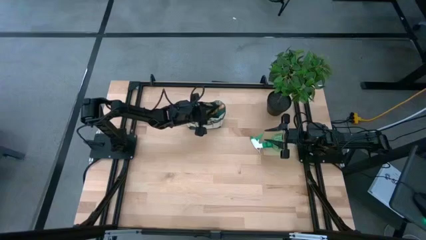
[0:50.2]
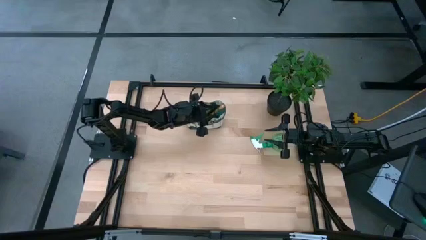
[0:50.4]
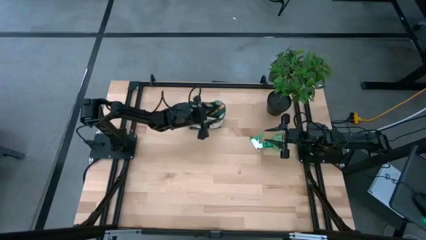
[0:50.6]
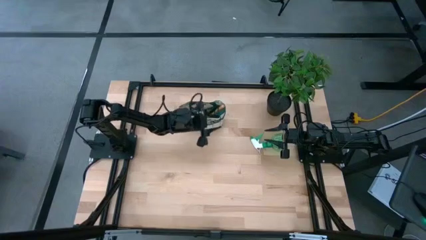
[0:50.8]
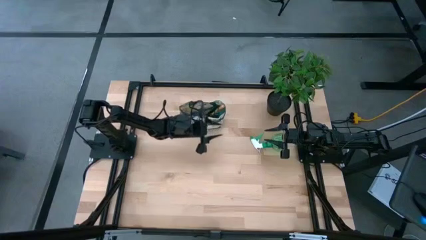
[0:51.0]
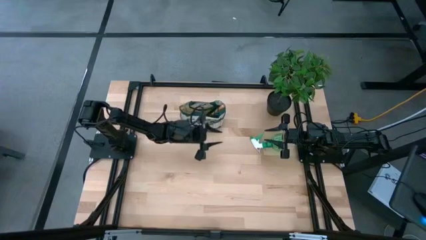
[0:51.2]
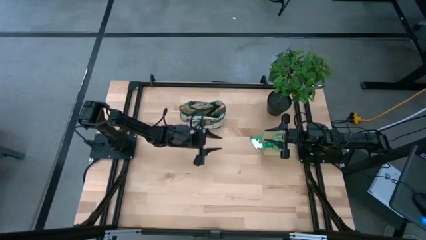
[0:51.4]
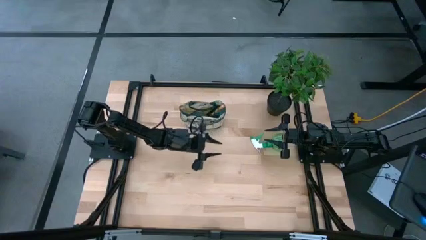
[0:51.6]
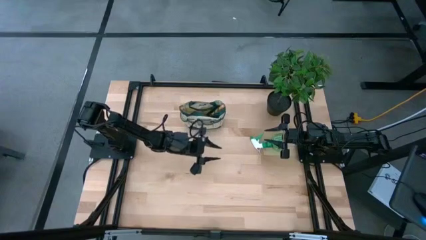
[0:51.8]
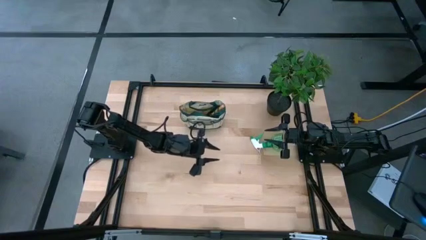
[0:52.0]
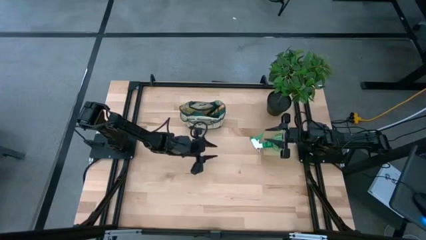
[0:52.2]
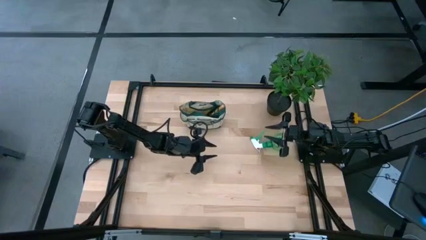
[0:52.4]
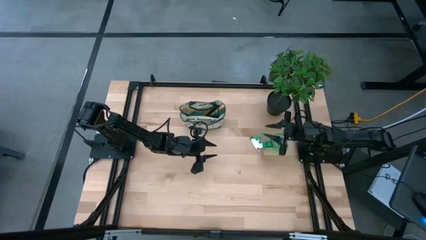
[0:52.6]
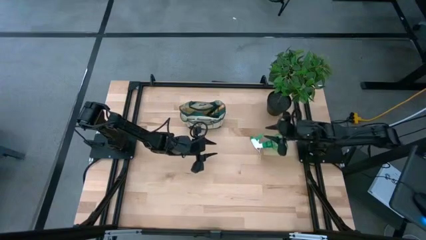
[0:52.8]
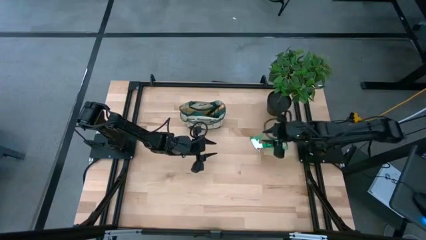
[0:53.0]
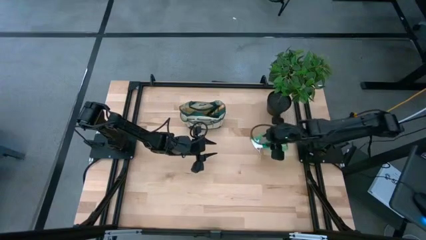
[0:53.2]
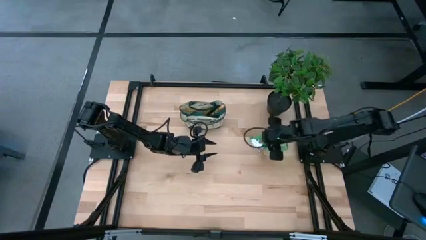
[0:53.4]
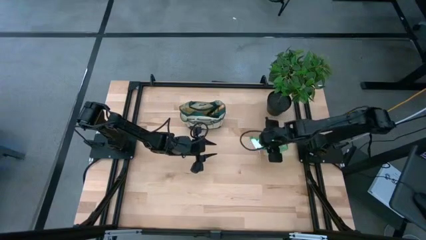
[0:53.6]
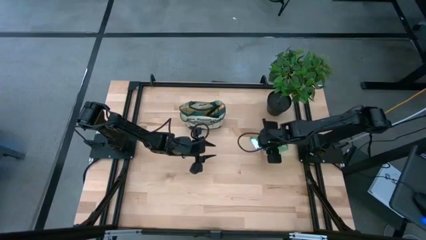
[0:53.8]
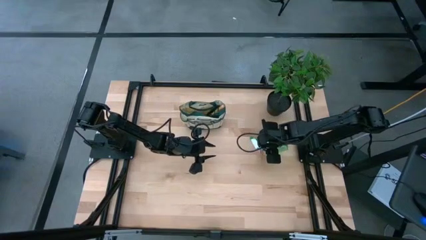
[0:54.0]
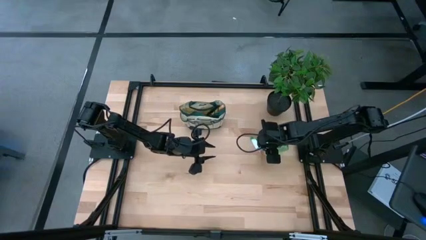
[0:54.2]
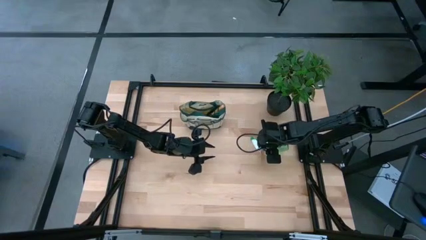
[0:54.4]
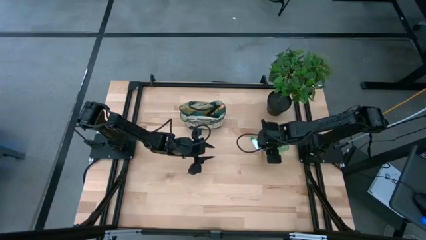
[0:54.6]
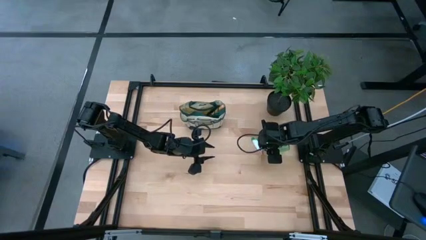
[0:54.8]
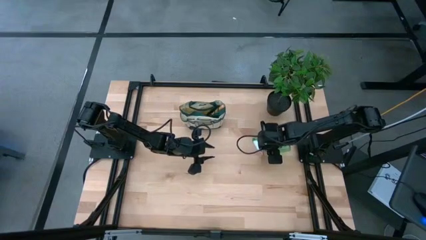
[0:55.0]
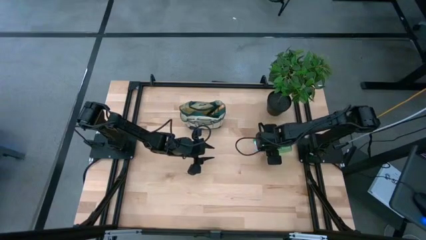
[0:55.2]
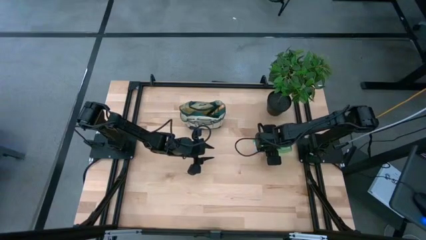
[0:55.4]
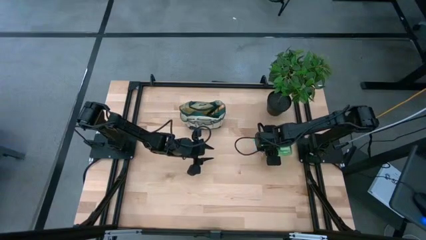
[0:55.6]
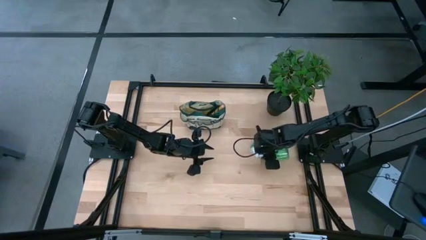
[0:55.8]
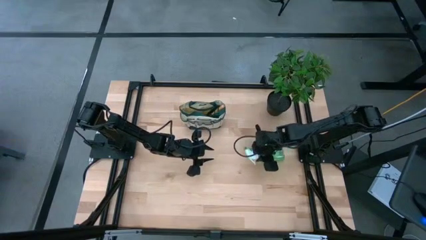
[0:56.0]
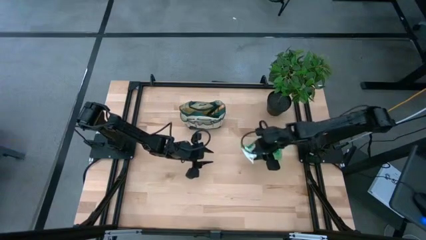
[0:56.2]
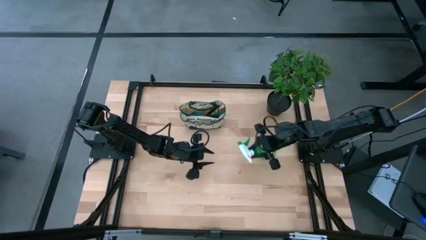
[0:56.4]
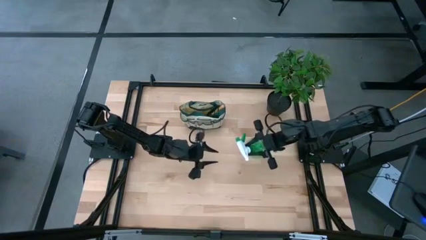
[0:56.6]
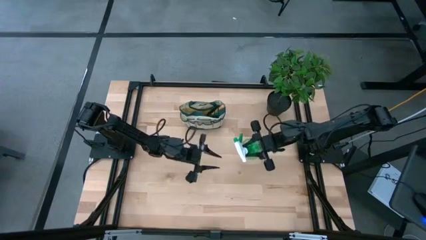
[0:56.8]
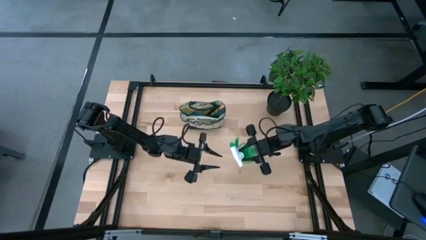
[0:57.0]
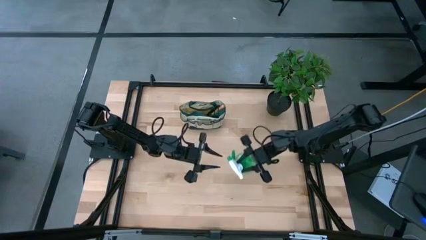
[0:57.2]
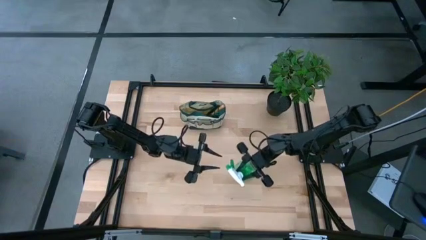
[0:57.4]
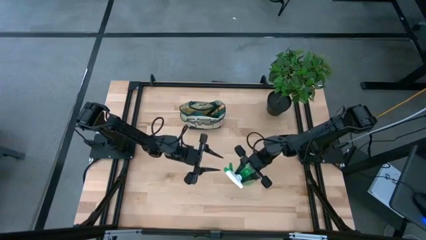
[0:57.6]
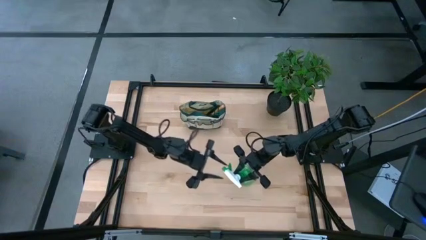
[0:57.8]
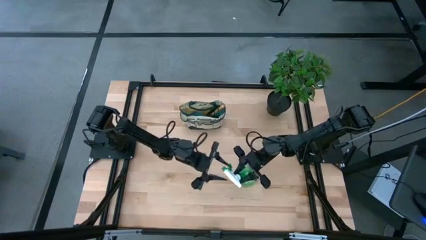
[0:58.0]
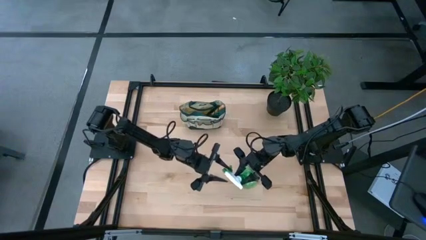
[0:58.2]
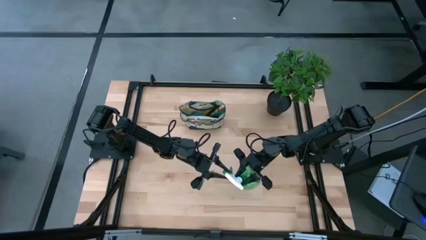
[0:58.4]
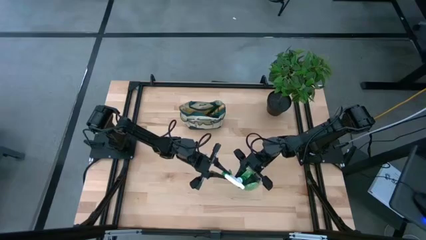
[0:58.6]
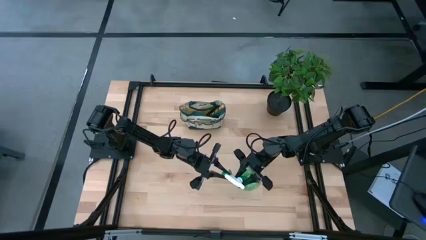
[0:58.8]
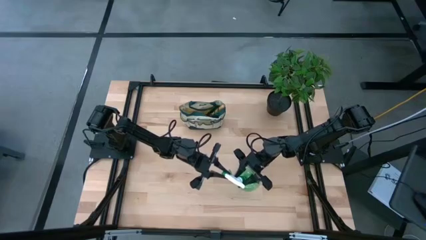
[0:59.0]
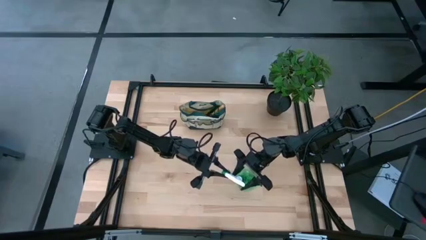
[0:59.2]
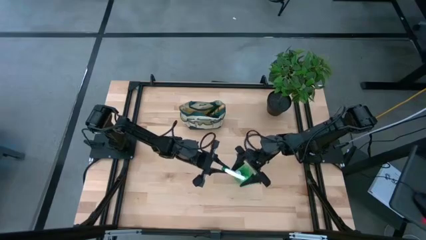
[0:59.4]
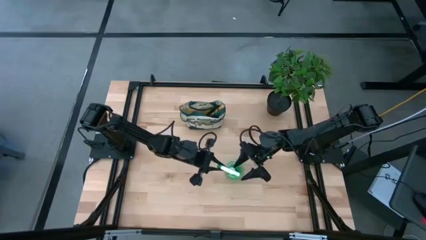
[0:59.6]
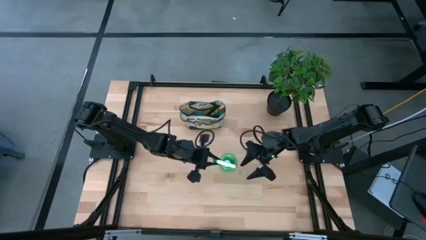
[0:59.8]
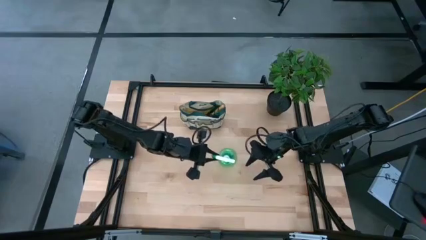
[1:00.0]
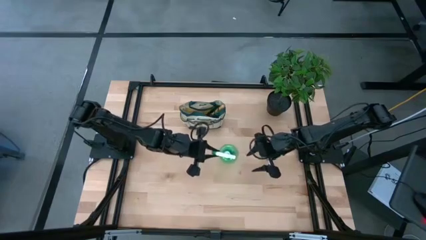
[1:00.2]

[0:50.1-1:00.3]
Task: Pick & Place Garden tools in Gardening bag
Put the green spray bottle into the light brown gardening bag
